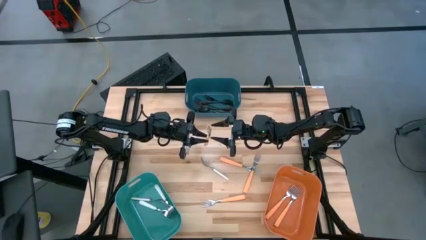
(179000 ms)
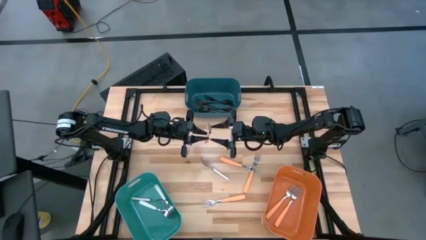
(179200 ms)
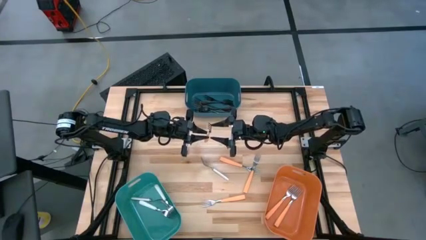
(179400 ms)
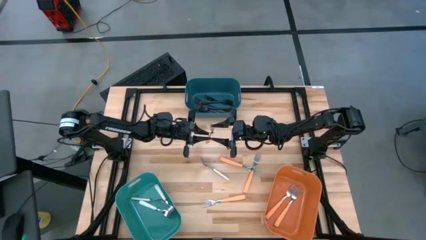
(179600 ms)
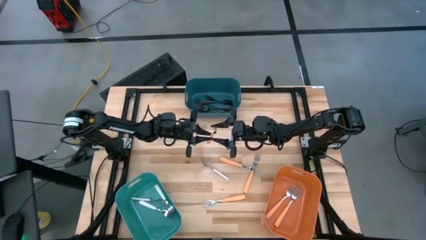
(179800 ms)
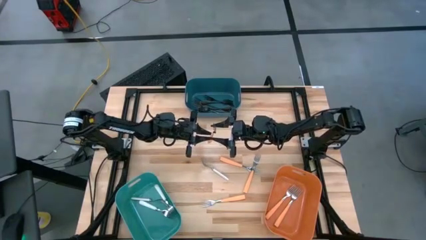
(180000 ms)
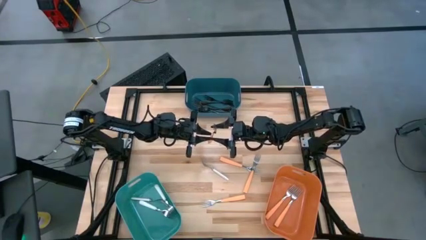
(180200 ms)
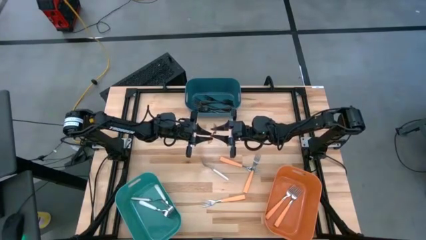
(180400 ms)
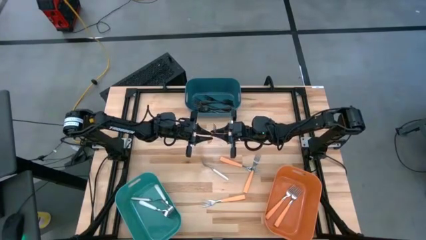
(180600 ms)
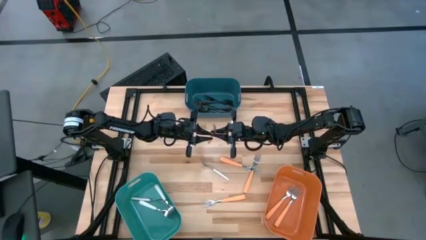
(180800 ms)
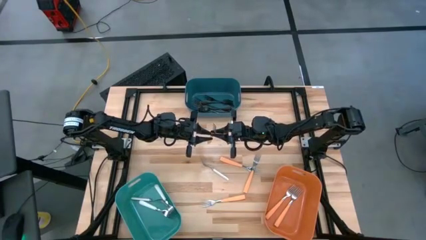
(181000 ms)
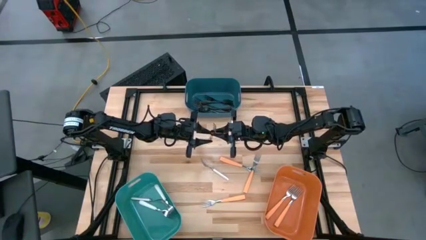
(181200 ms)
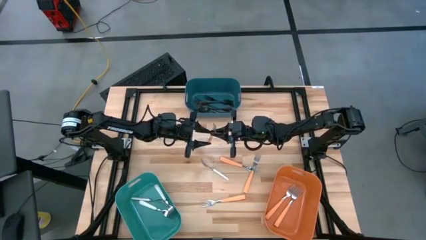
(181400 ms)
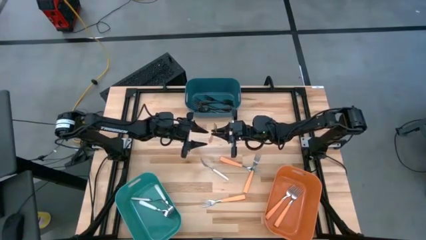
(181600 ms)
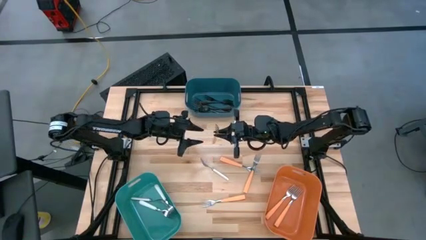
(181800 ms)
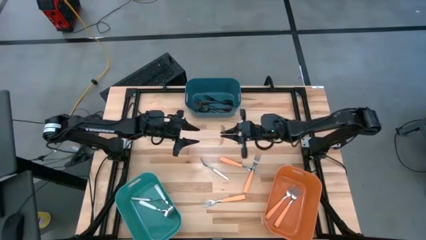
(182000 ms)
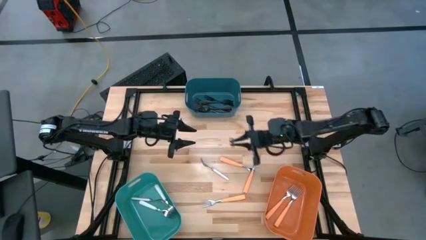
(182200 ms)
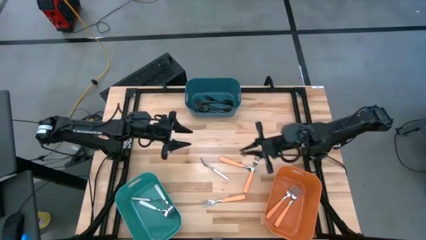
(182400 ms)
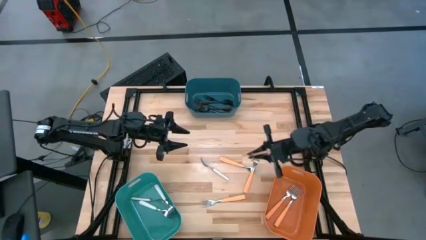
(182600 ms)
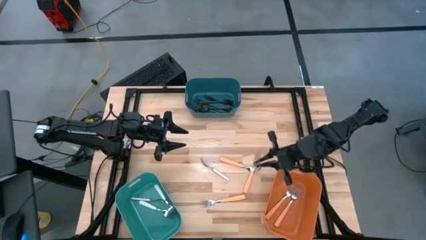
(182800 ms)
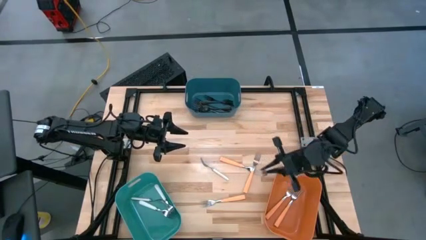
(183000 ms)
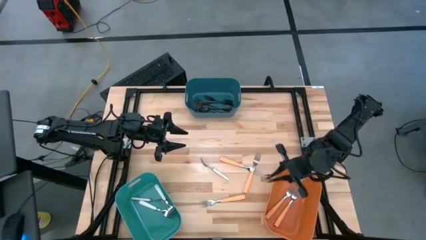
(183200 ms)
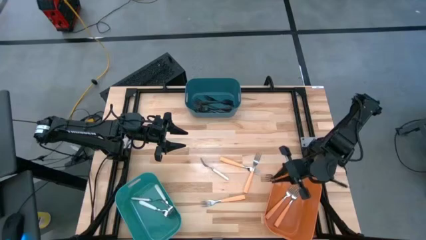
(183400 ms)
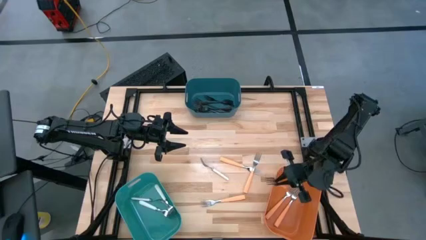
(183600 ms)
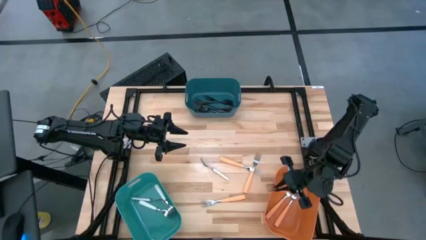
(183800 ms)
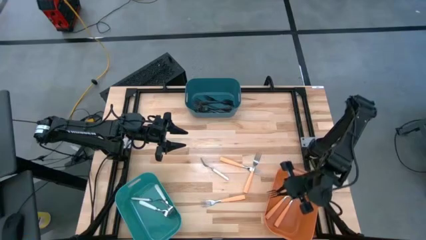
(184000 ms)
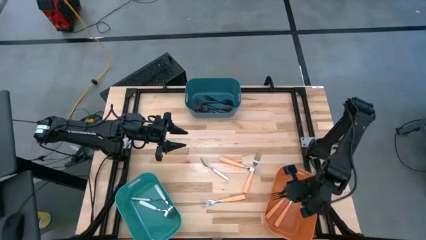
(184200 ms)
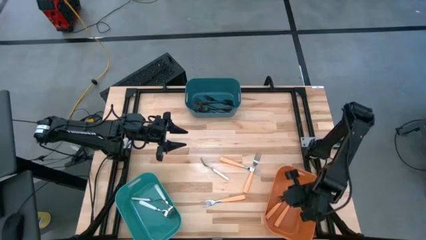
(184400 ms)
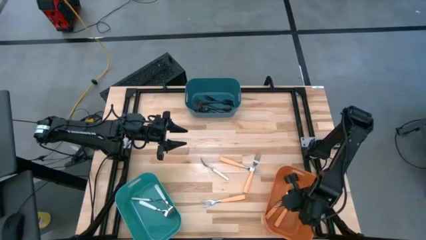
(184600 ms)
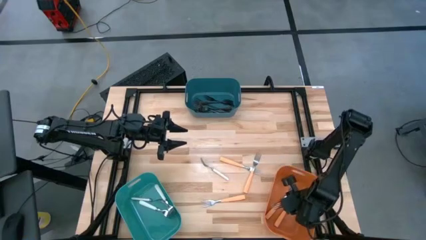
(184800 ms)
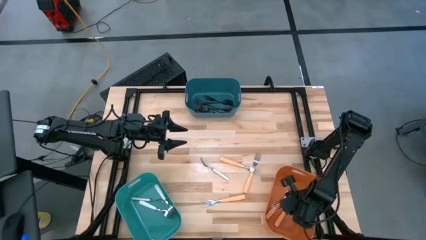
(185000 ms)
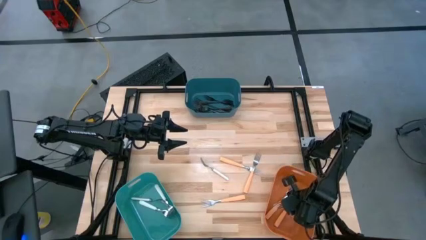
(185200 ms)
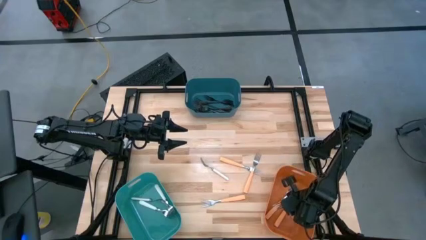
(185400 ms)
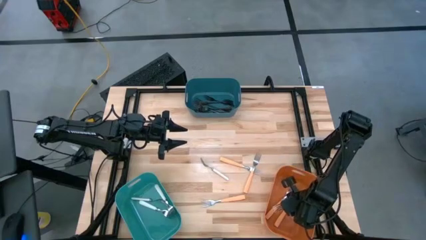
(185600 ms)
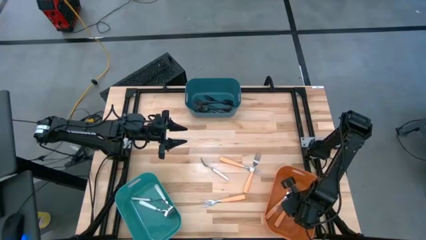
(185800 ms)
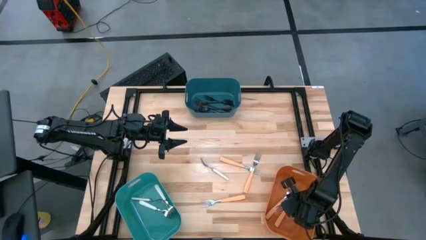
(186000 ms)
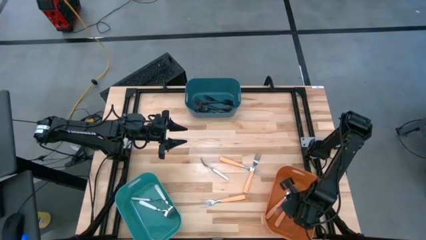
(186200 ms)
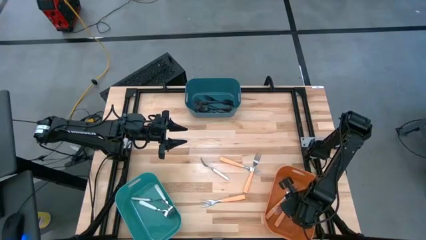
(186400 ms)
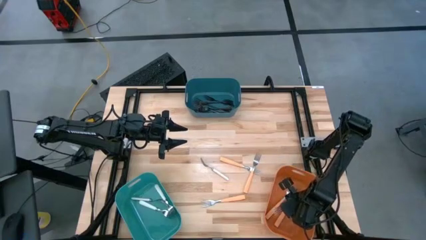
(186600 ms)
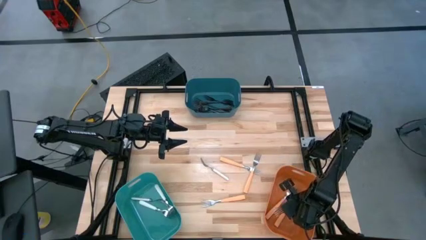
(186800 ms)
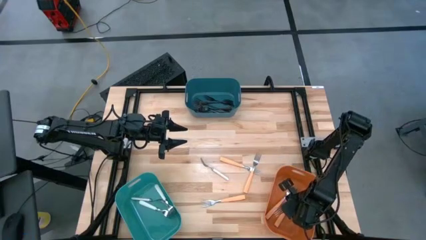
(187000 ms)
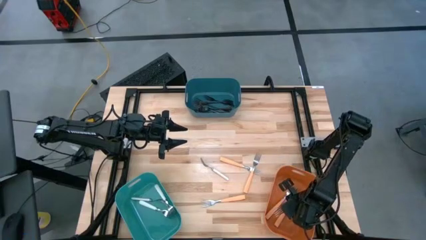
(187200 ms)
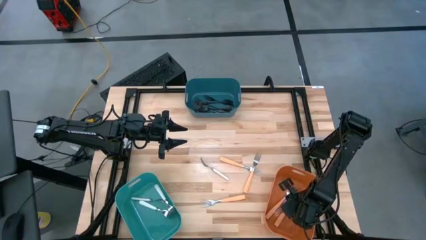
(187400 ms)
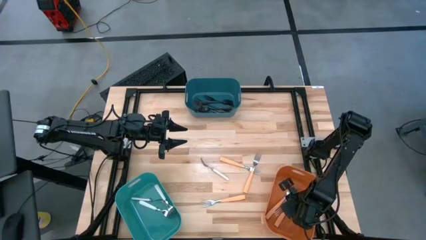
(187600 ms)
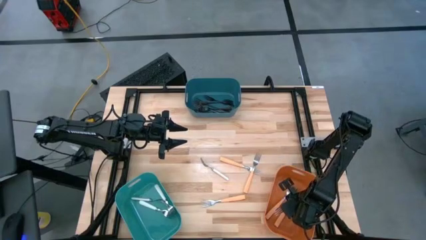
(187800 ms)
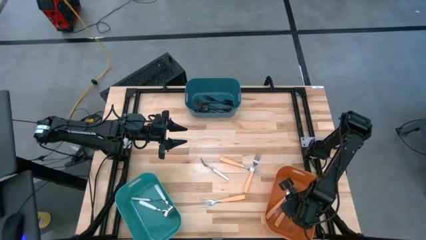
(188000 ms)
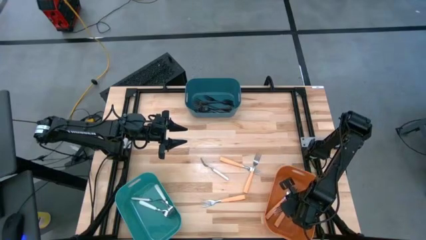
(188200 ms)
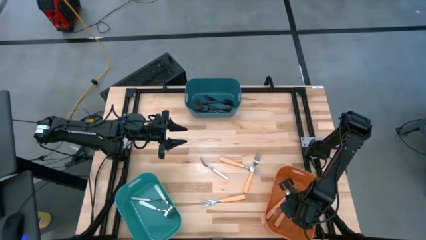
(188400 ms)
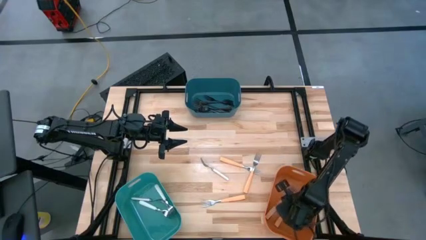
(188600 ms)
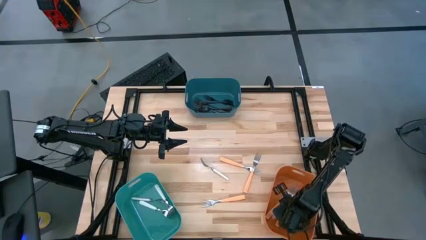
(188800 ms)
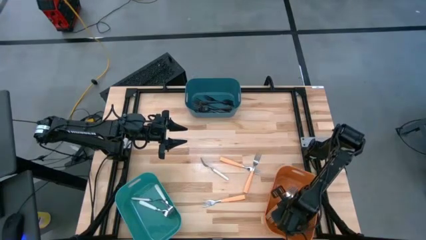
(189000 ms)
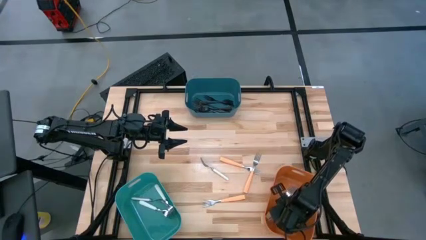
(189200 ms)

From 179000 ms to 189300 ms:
Task: Sort silverware by color (type)
Put the orange fork into the orange bin

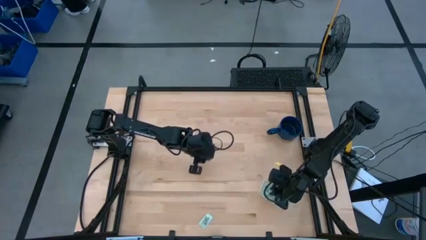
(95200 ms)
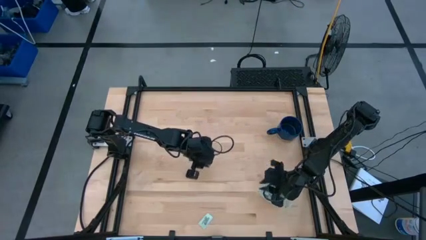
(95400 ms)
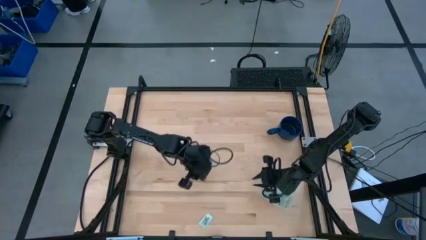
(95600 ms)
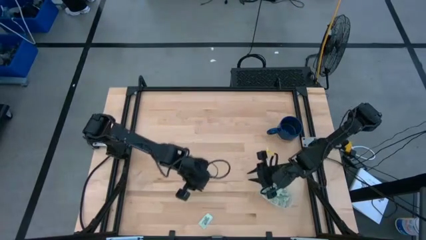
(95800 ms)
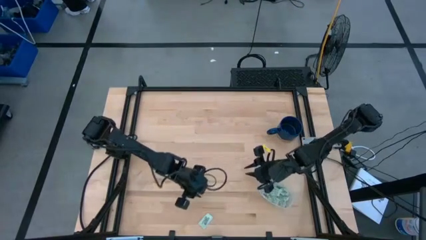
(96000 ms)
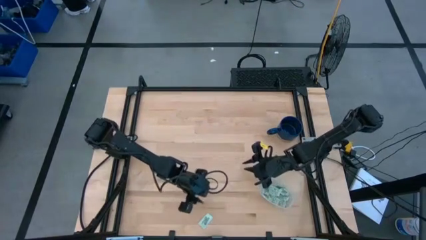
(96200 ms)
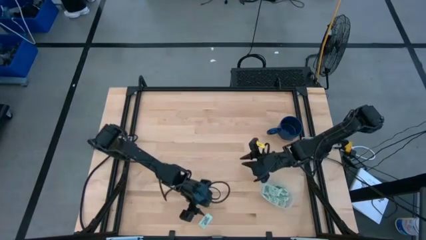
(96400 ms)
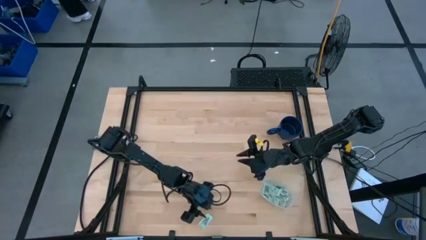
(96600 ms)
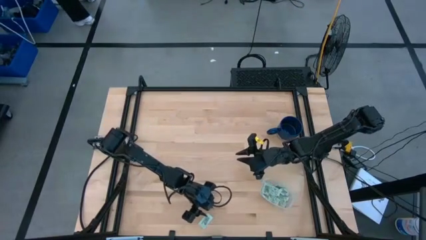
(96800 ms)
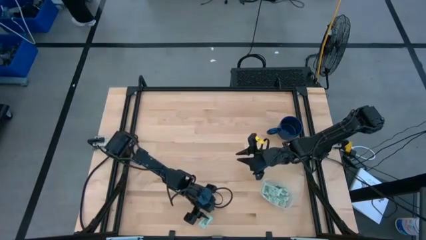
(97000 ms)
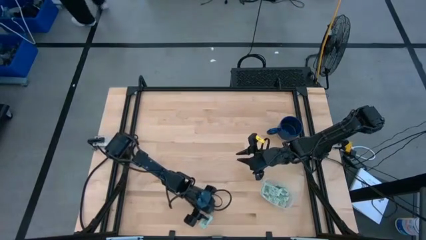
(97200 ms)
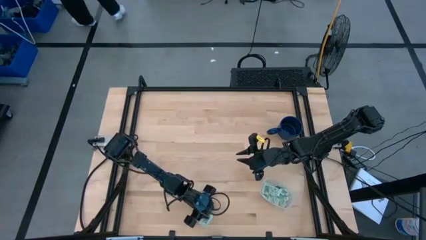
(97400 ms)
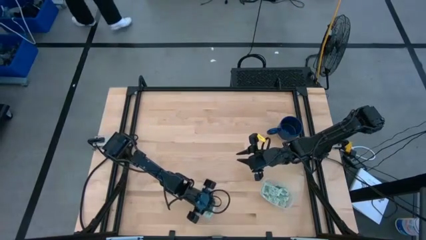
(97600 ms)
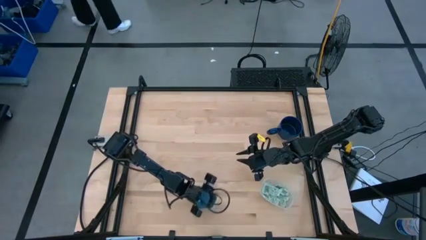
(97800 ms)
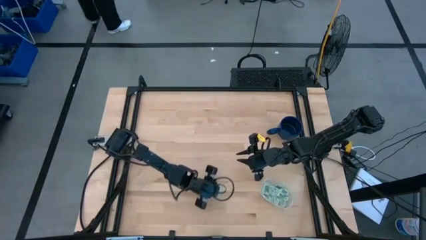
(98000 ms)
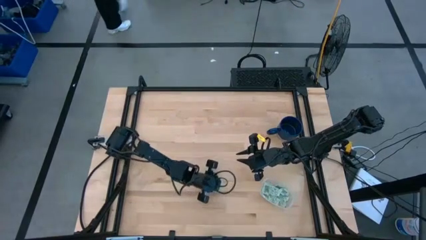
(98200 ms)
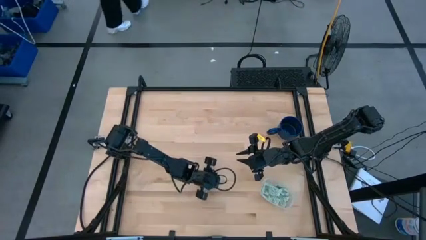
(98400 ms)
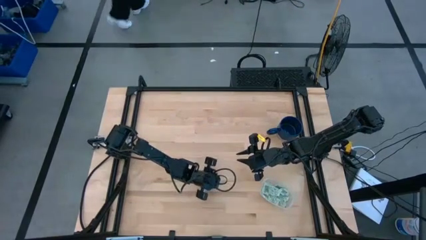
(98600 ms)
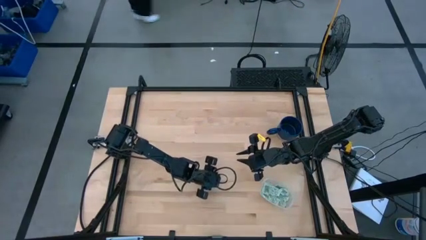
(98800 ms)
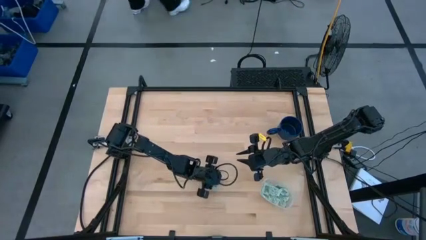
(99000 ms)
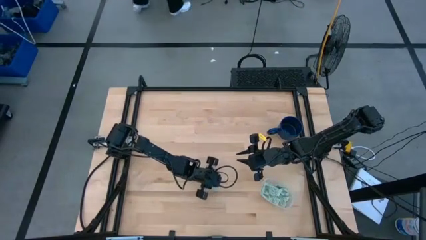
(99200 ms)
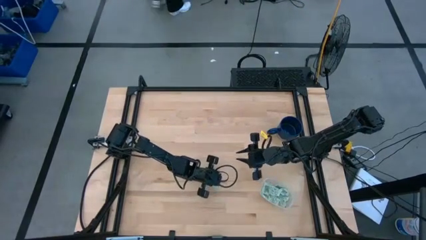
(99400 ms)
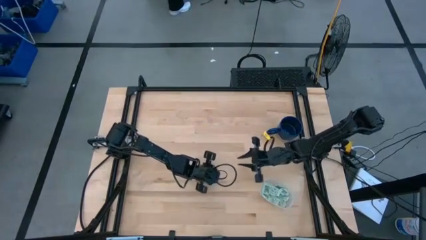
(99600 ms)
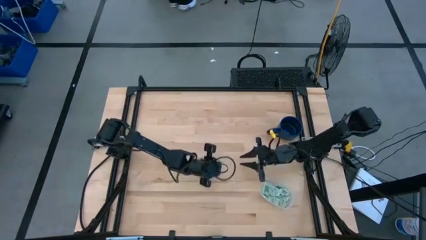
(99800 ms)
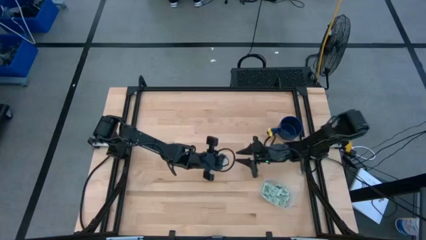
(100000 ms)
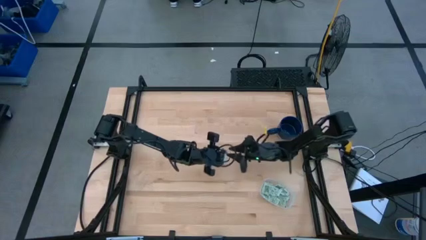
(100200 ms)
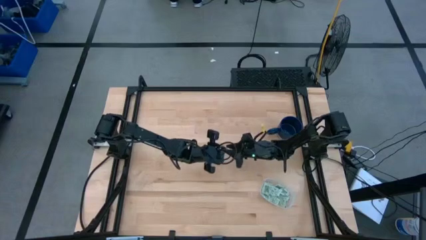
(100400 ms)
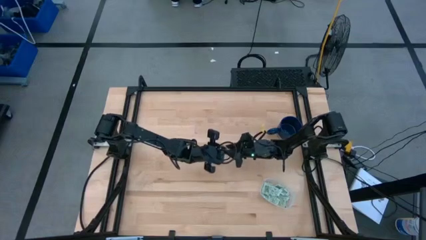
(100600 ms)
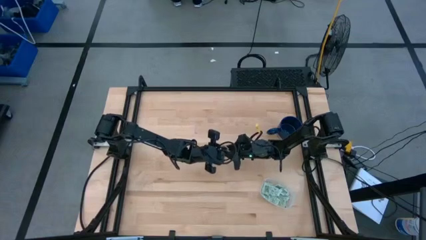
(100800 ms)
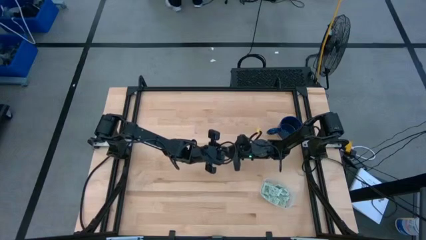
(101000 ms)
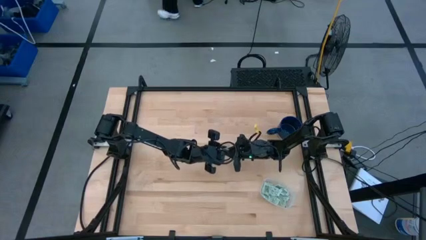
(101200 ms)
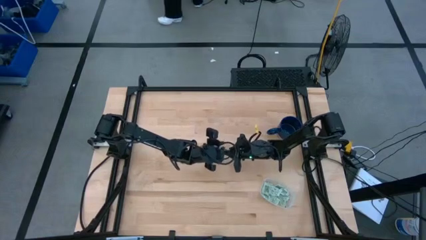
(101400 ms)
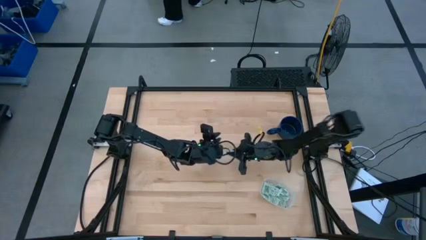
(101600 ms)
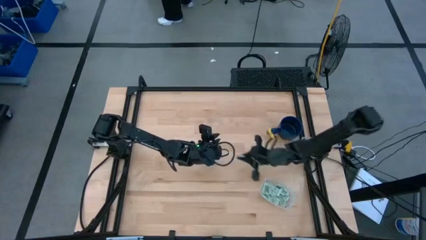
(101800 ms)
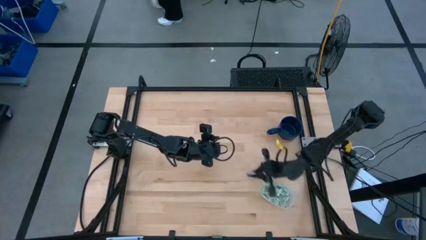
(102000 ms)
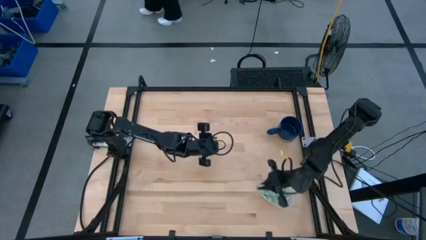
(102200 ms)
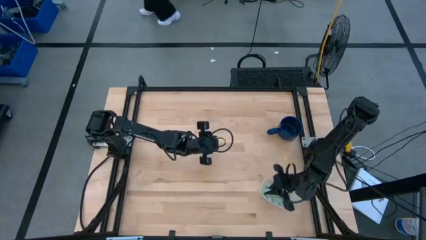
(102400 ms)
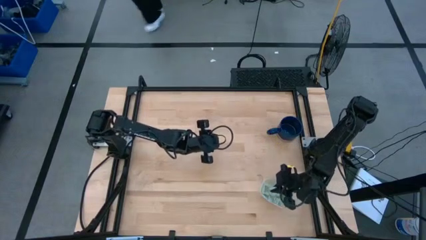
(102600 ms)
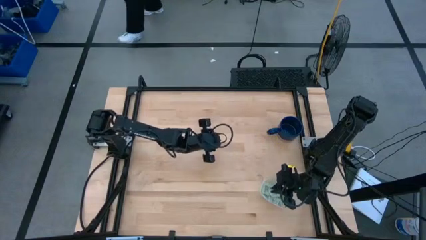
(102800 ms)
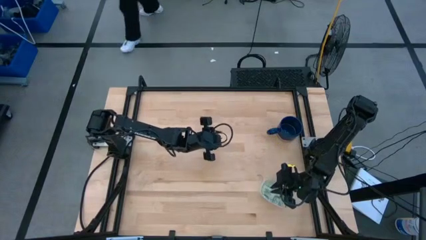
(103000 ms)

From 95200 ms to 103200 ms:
Task: Pick and place Stevia / Truvia into bins
Put the stevia packet into the transparent container
